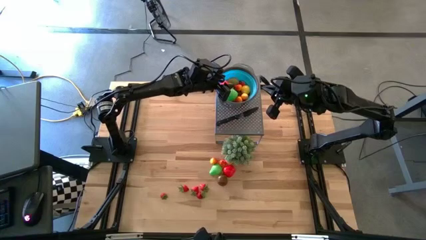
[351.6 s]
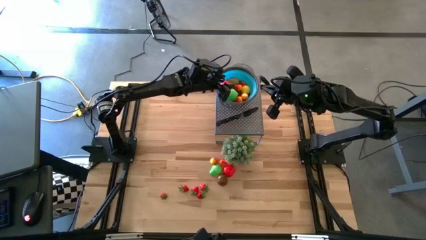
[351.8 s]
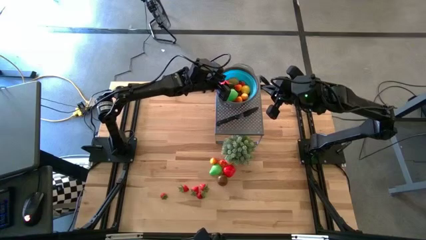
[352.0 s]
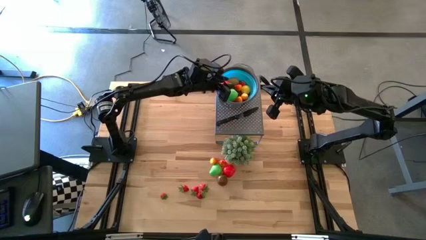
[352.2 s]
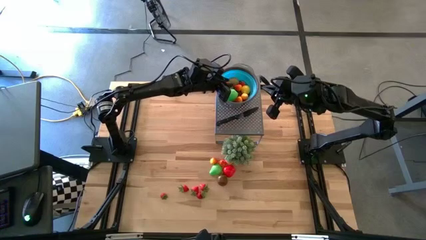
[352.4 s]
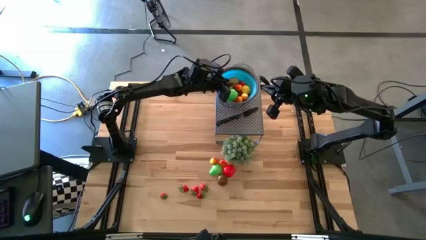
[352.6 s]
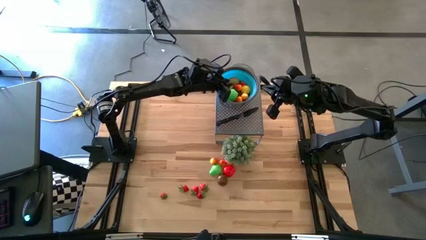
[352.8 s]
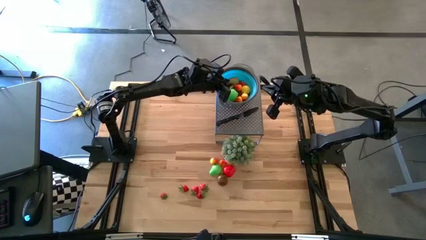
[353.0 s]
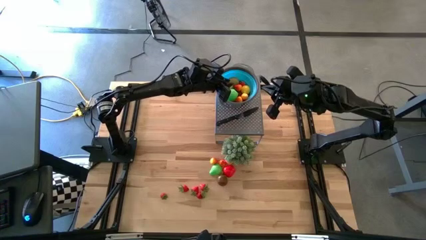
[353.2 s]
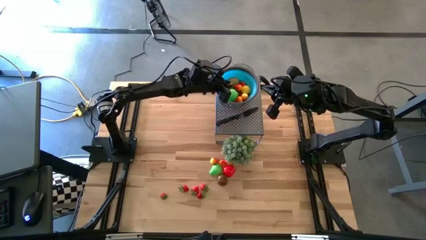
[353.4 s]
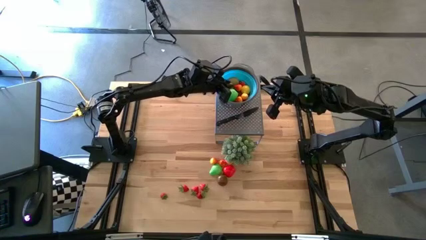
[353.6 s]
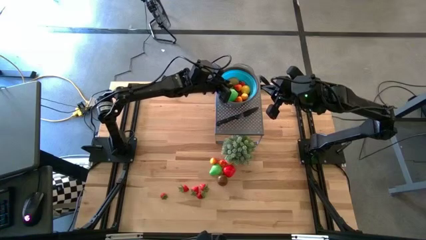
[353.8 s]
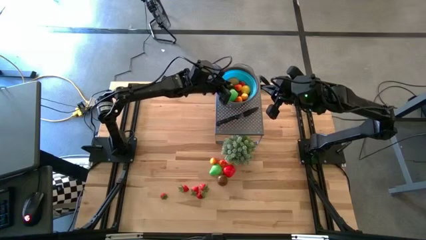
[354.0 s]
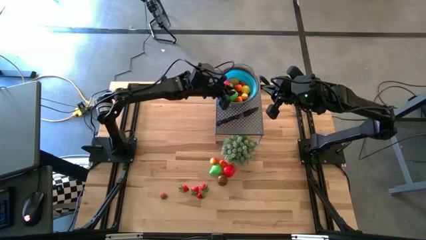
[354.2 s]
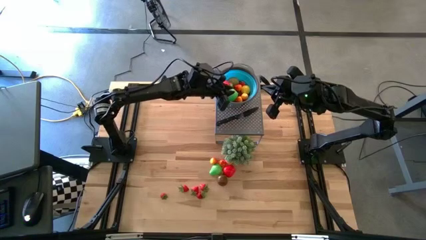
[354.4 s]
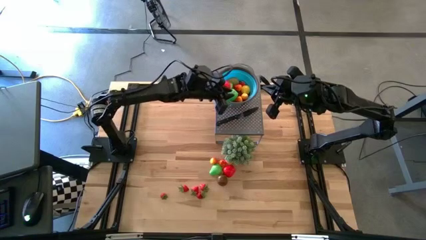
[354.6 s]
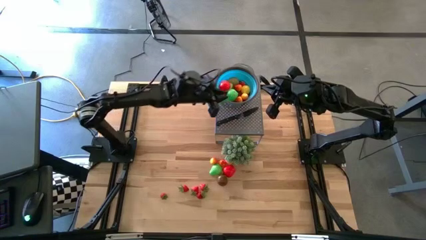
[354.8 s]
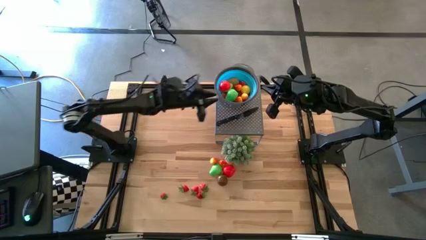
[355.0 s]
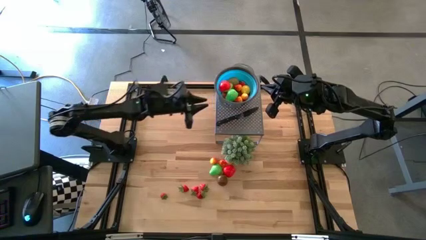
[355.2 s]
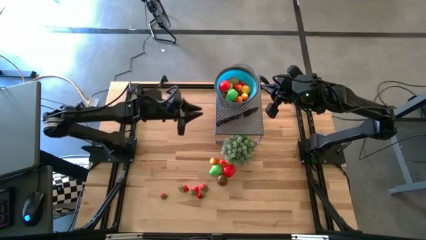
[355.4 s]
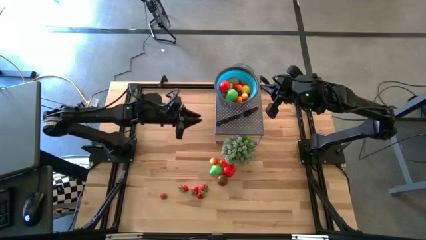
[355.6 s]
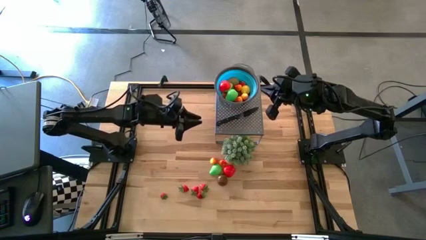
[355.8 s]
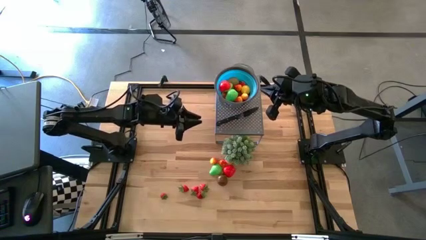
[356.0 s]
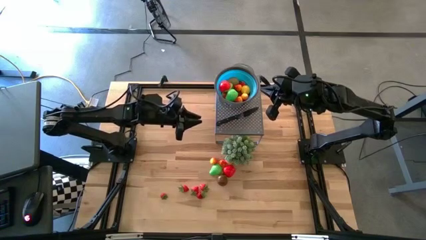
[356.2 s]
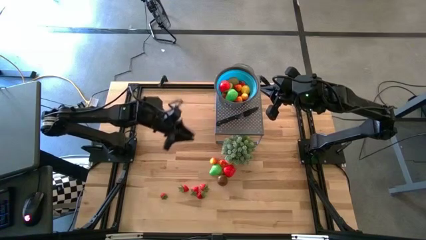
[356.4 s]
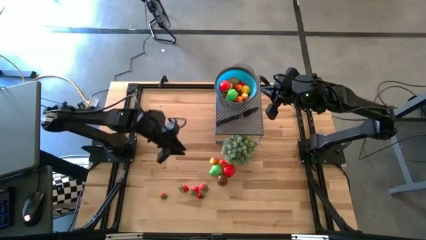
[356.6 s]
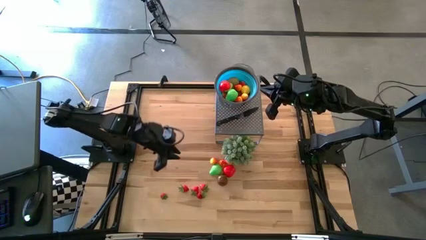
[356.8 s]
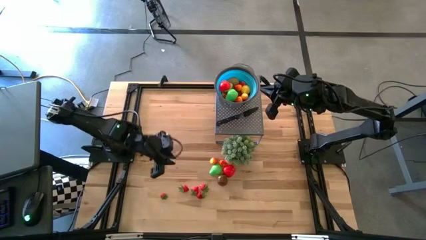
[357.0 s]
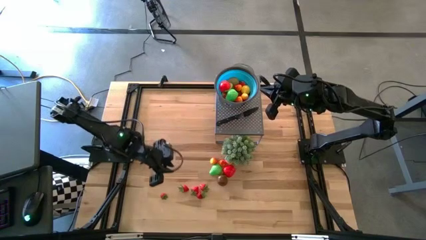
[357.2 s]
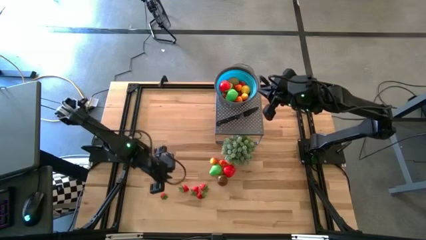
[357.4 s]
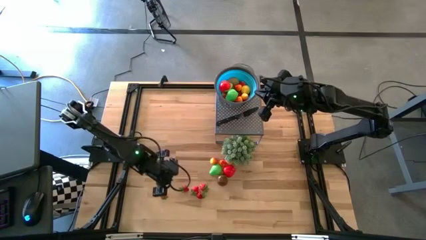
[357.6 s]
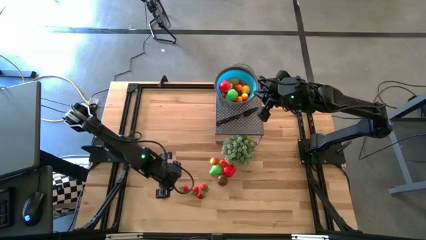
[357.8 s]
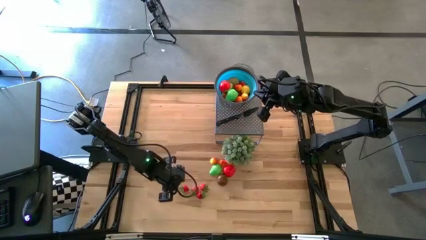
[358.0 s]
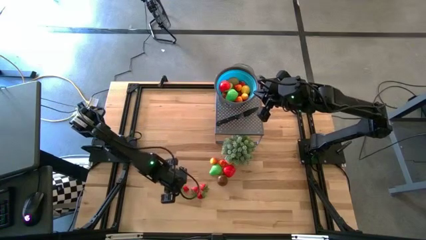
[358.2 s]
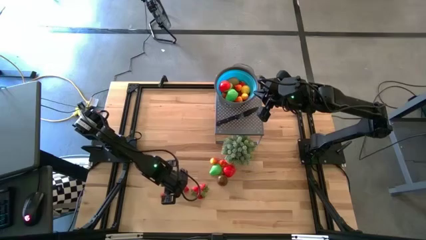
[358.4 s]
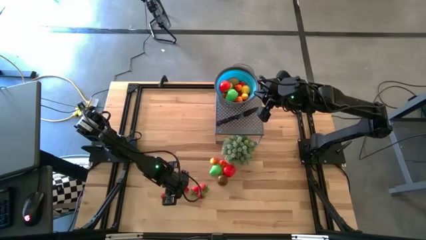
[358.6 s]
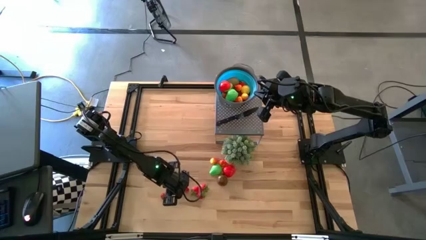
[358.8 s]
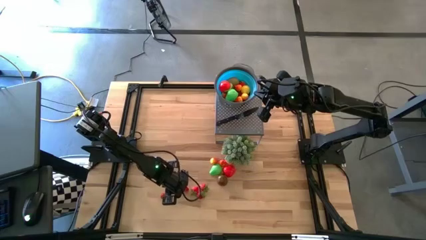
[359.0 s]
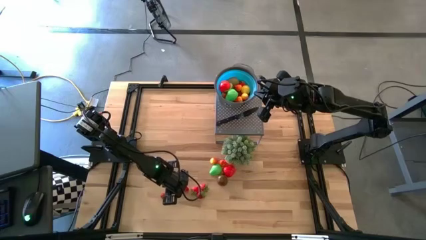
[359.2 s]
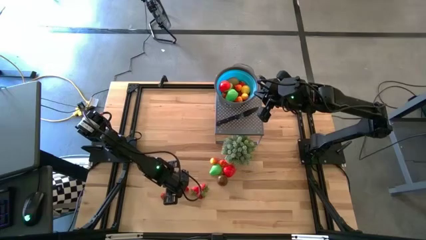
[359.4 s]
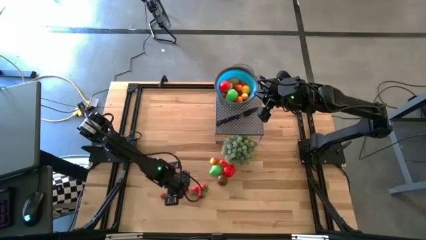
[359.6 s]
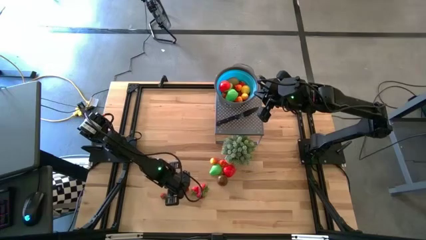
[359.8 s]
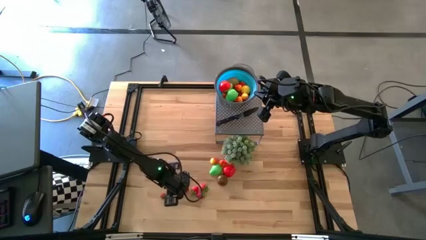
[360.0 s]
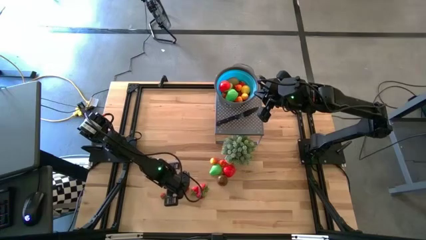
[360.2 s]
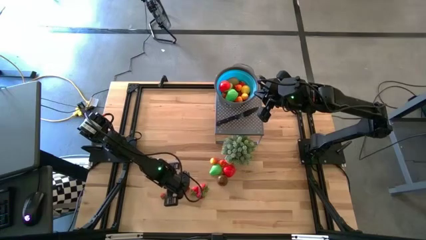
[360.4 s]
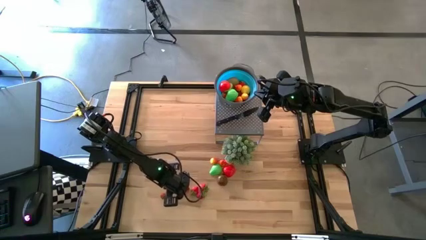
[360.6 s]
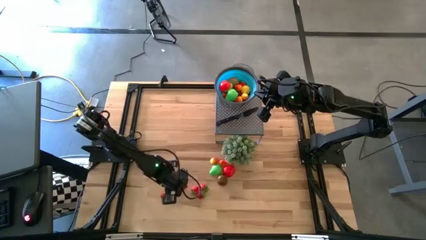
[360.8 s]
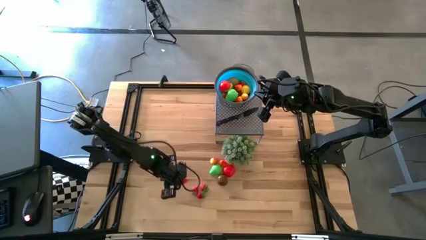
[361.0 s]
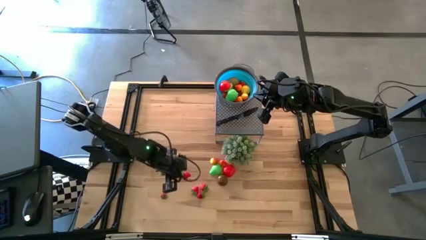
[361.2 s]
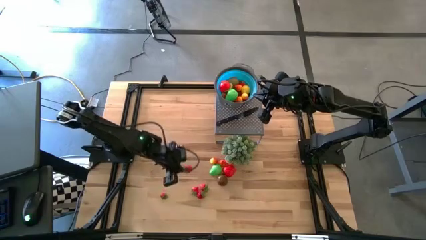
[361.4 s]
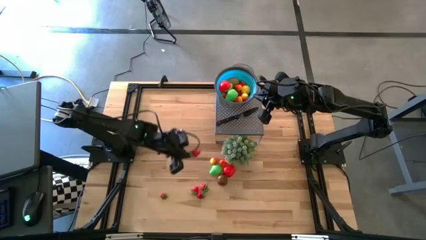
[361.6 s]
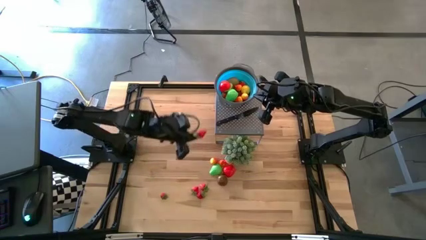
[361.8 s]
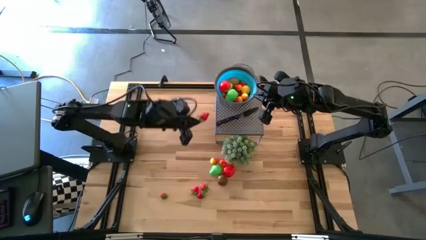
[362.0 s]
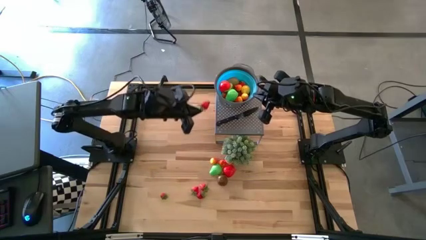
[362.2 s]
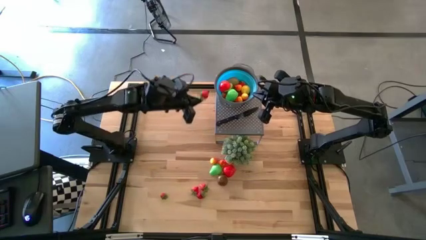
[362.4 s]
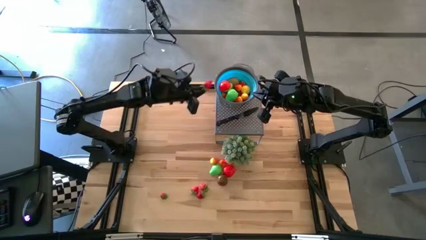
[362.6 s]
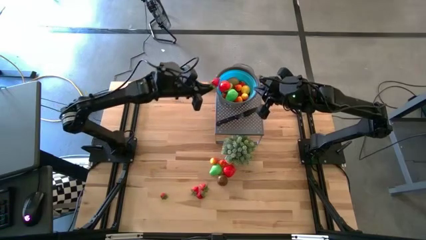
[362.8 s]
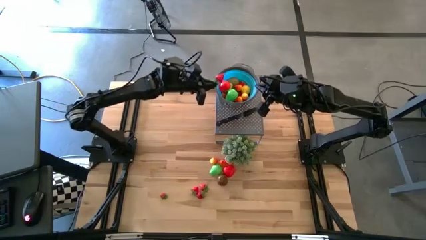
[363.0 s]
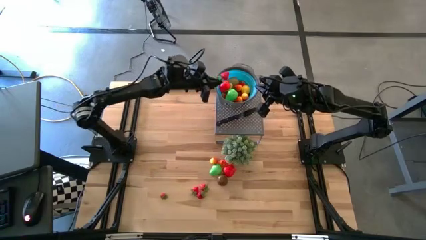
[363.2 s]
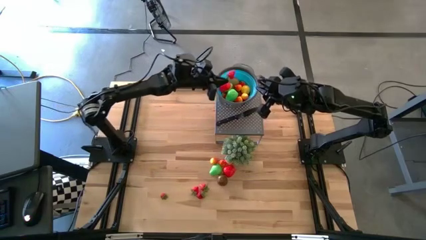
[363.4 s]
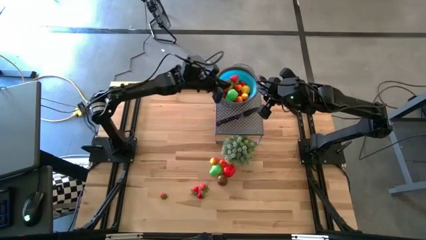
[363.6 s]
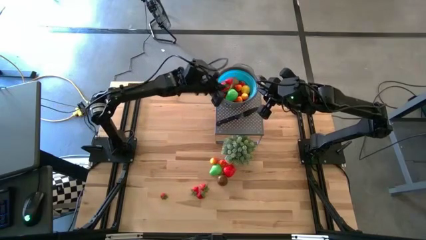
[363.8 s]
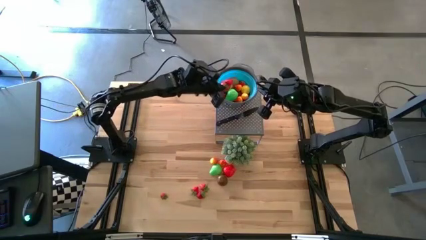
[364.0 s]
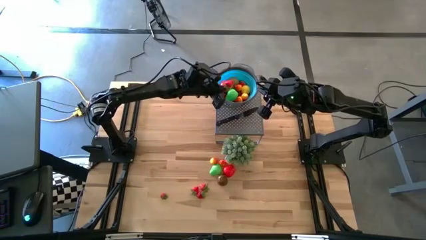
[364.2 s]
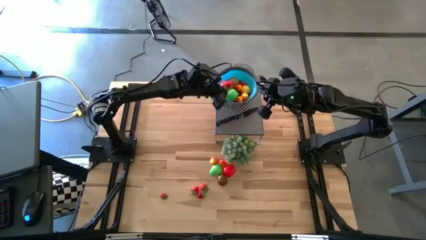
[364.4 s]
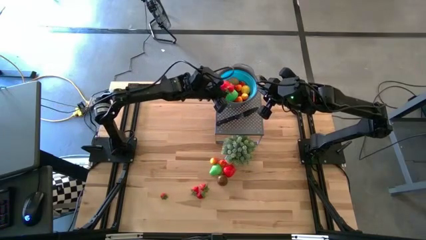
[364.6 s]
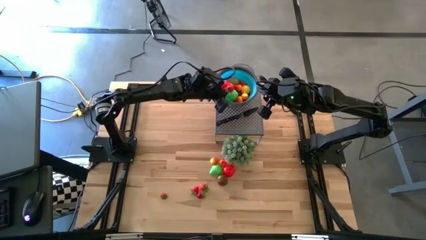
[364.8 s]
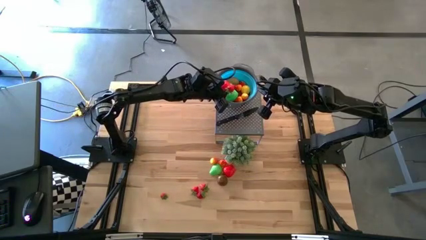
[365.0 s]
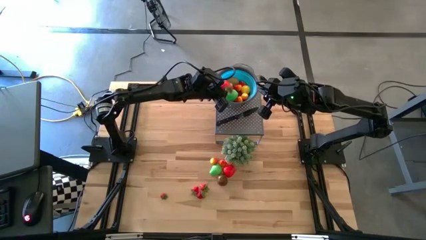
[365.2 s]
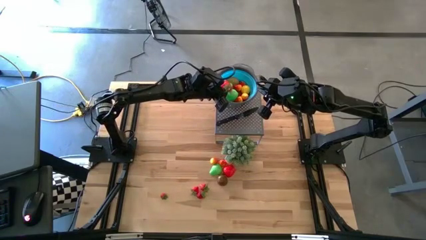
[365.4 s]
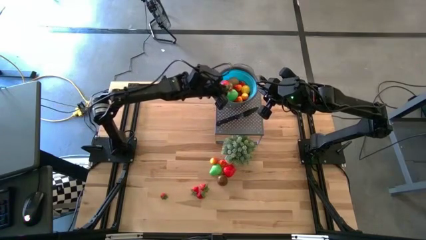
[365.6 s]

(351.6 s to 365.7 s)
Task: Pick & Place Fruit
Put the red strawberry into the blue strainer bowl

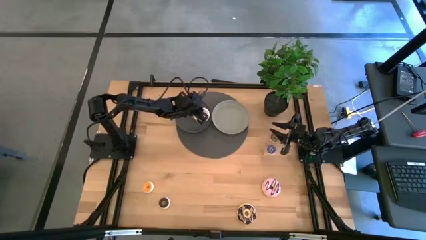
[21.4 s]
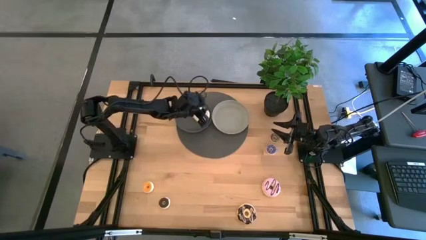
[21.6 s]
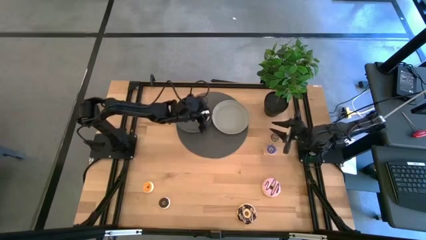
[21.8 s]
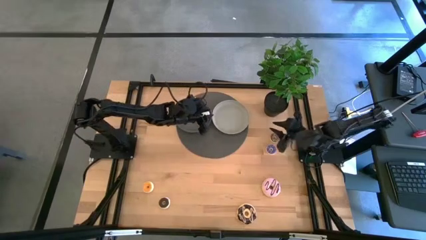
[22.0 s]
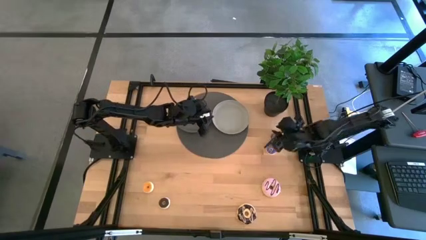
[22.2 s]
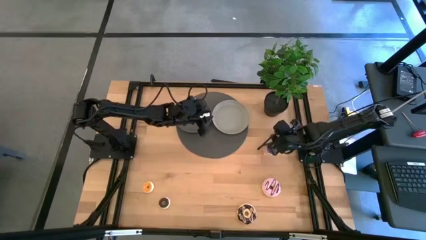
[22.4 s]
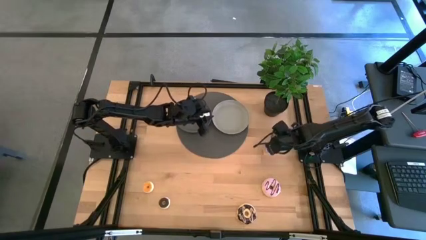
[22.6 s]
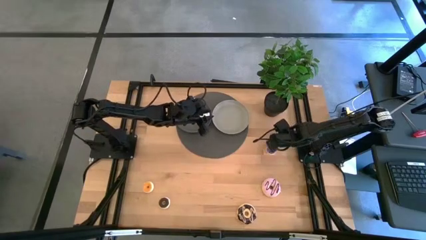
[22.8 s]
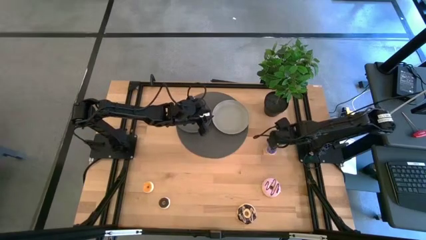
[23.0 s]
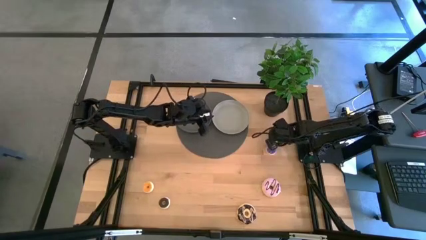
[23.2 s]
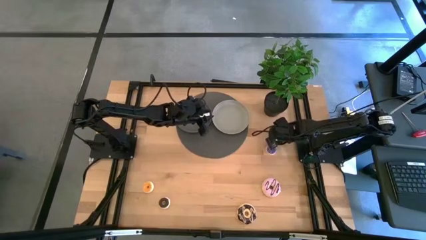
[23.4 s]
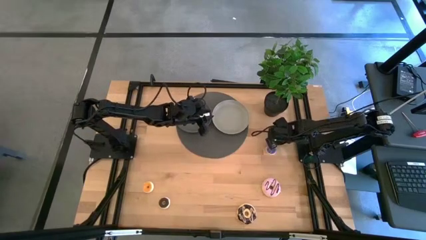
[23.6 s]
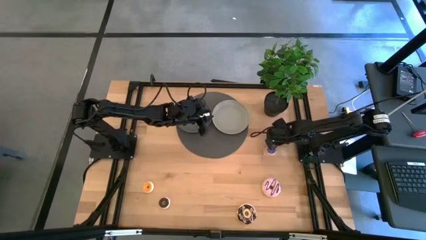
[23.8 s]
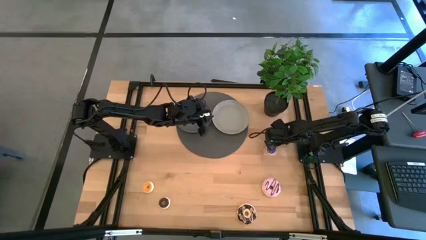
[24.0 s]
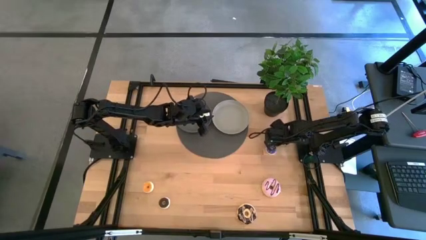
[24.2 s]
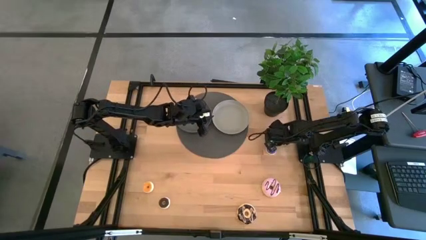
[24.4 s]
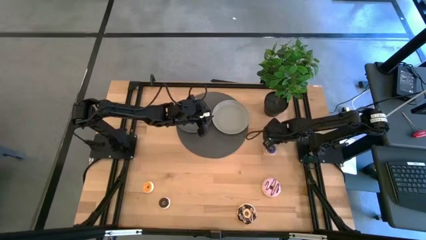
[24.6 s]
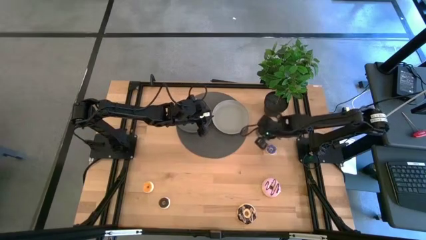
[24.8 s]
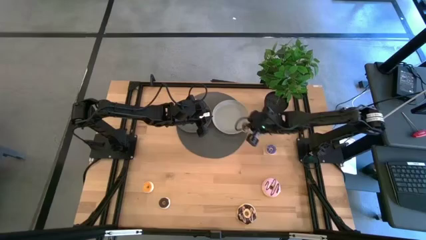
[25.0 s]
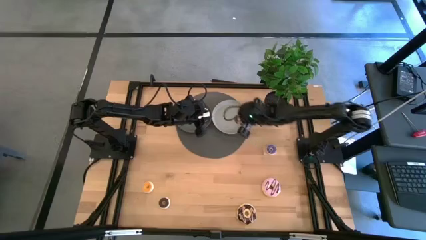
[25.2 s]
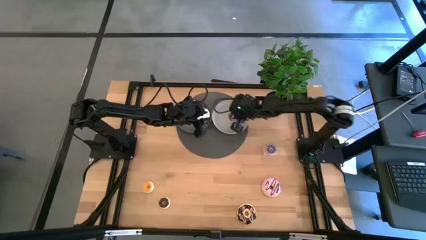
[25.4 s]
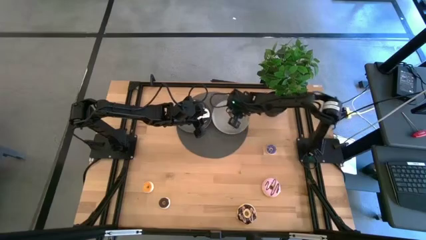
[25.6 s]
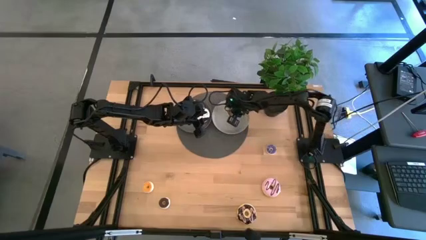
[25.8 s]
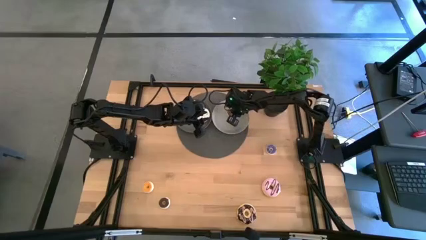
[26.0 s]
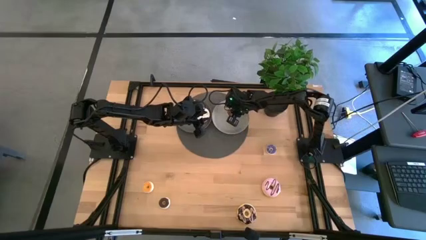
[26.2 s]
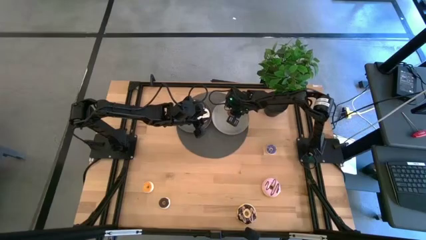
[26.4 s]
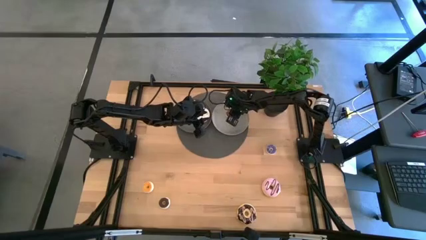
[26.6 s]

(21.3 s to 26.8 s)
Task: Pick & Place donuts
Put the small brown donut on the gray plate
